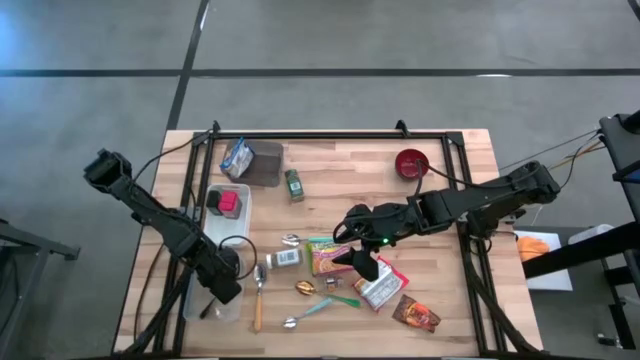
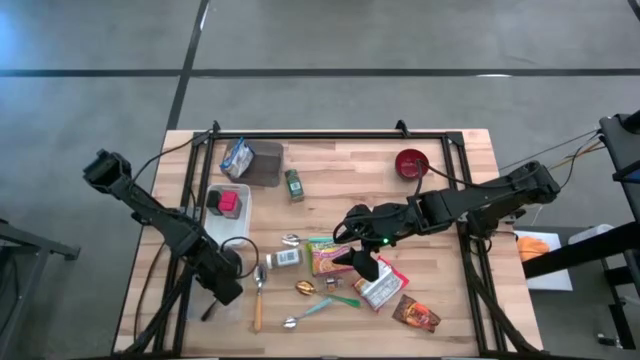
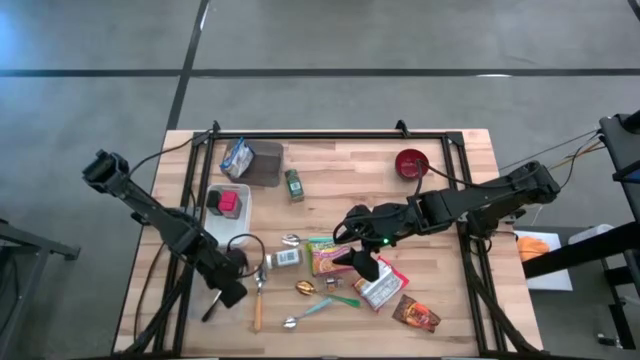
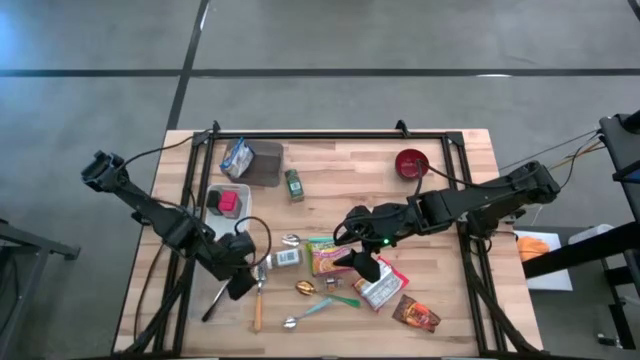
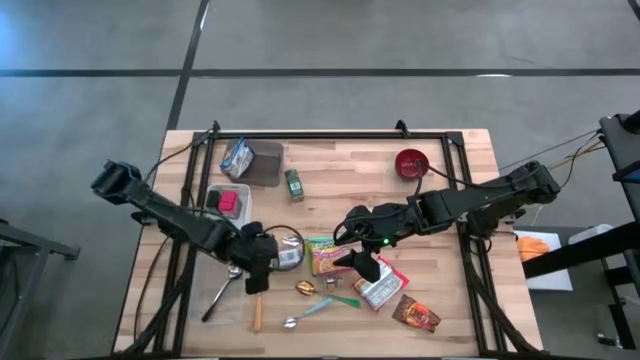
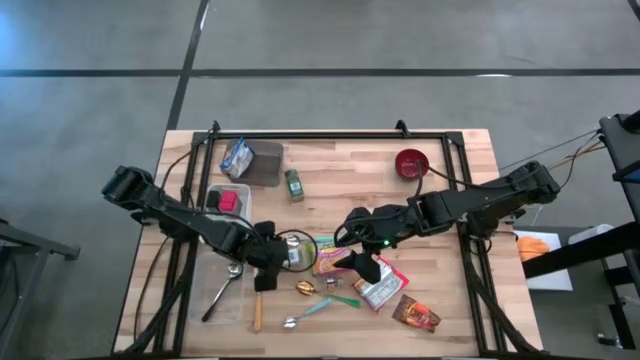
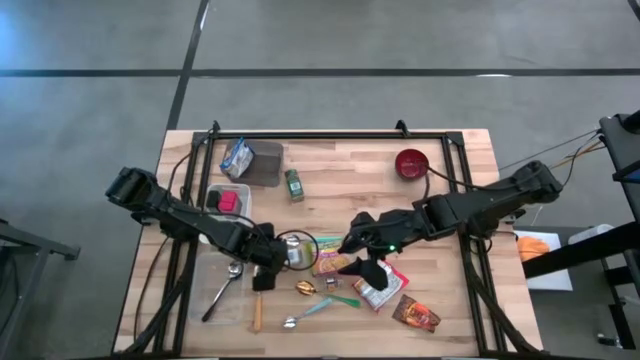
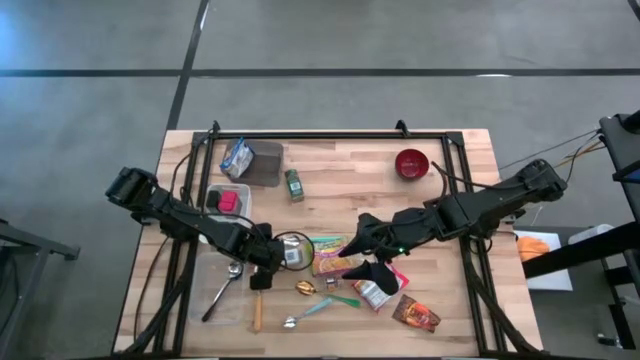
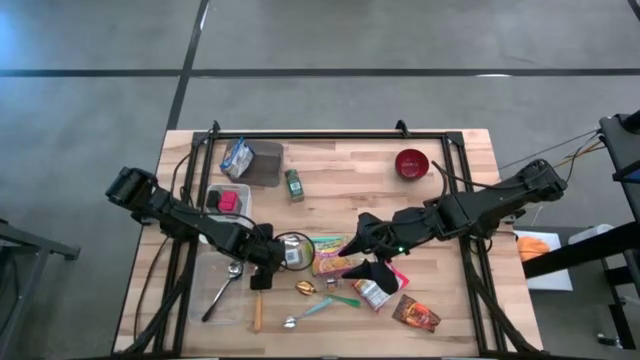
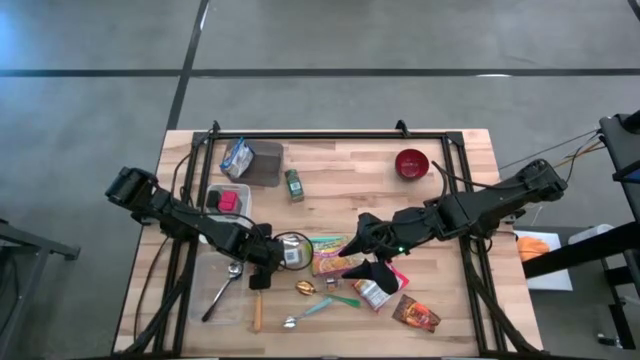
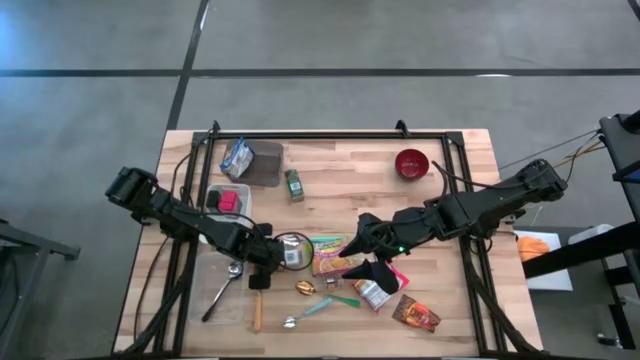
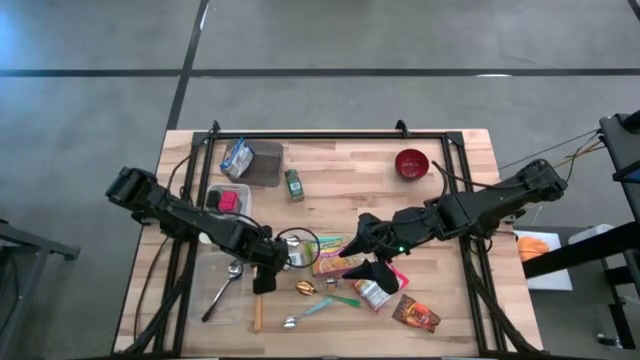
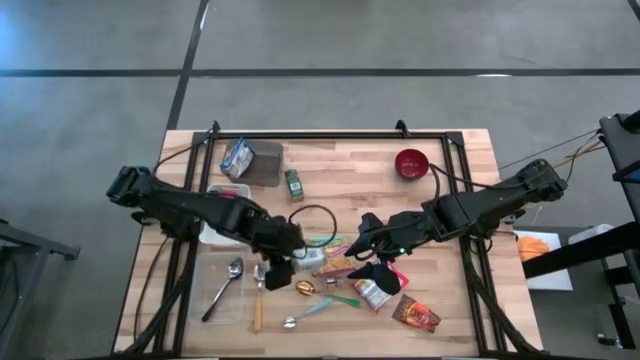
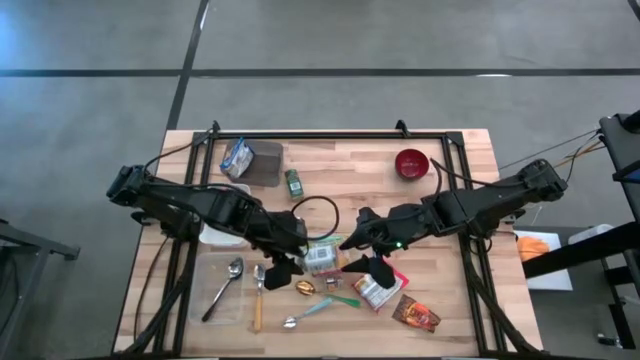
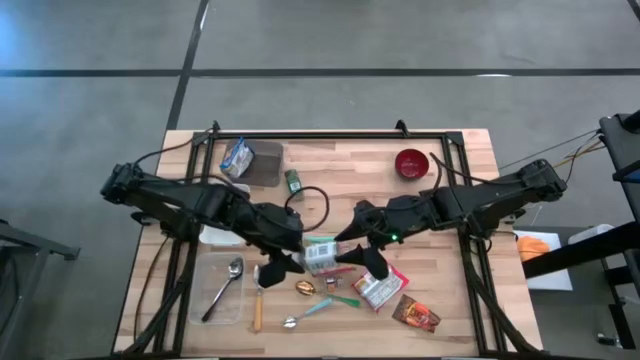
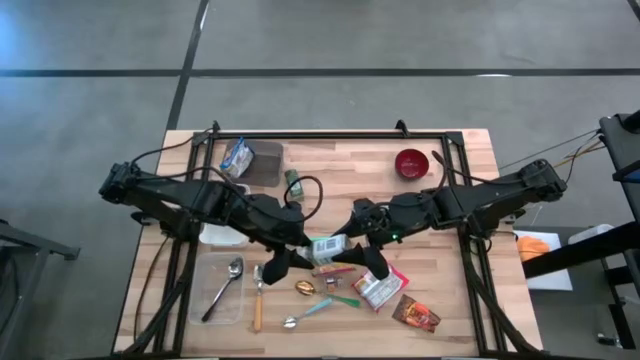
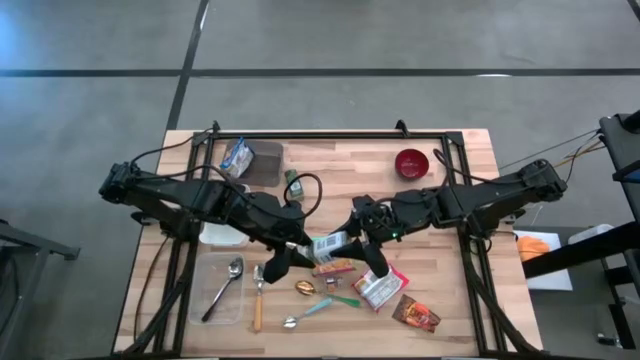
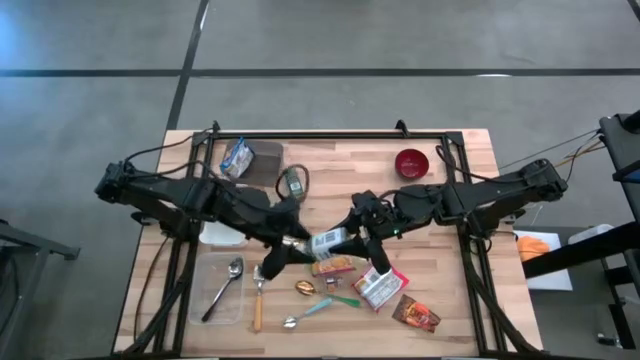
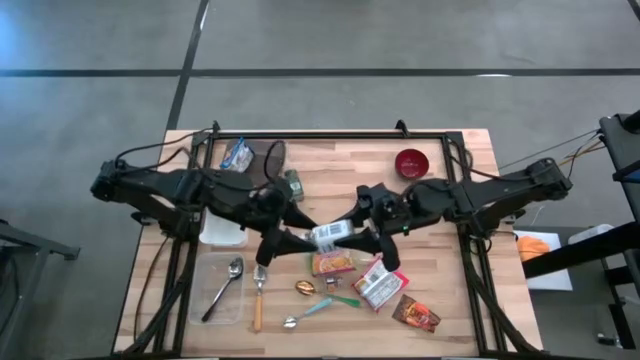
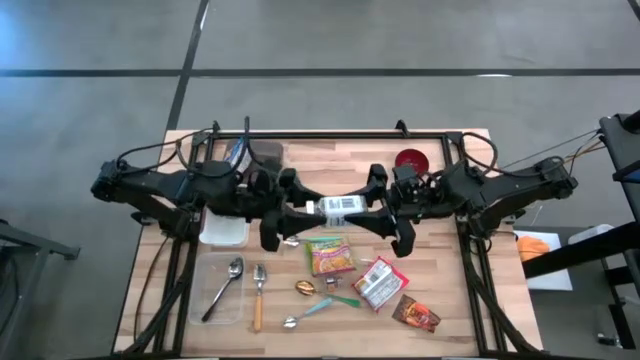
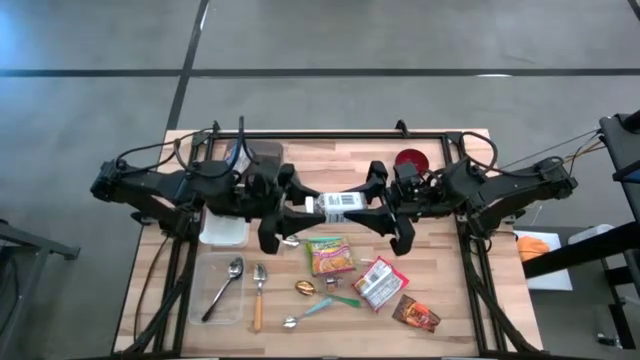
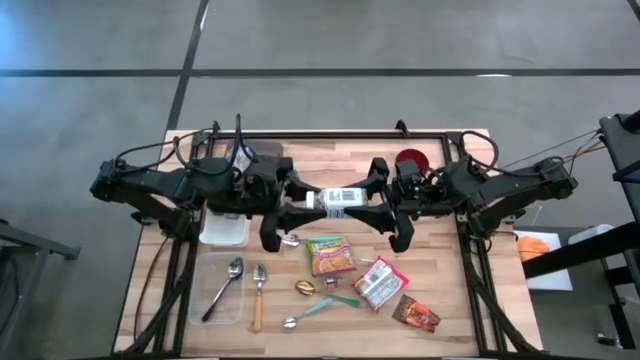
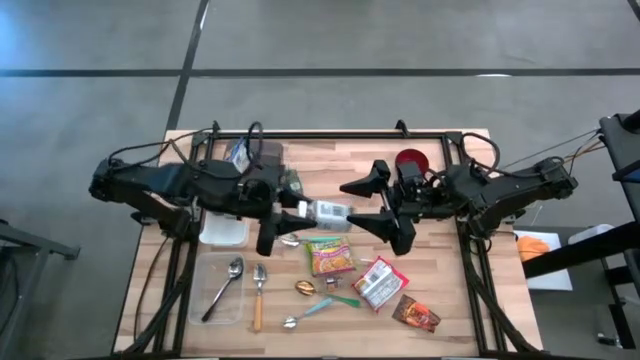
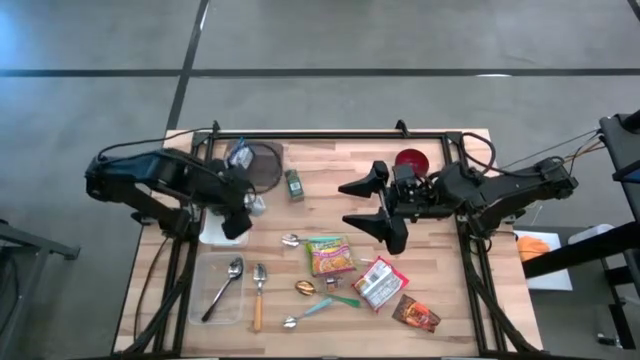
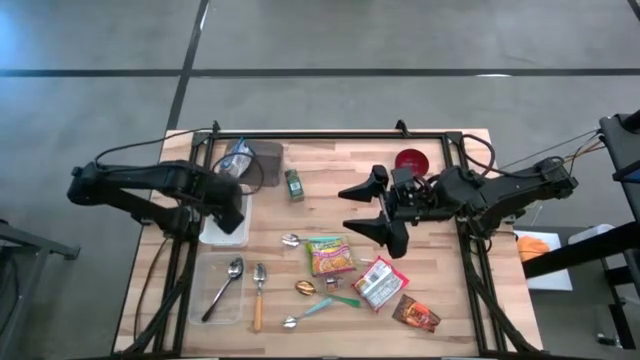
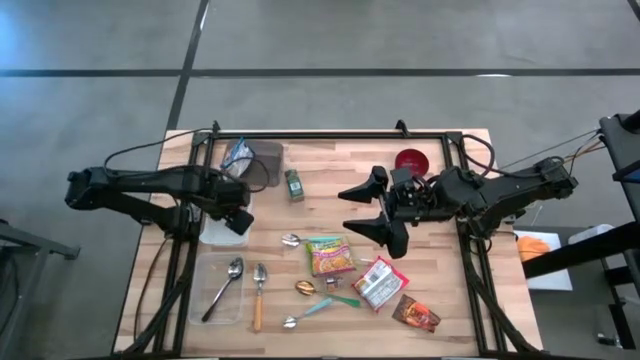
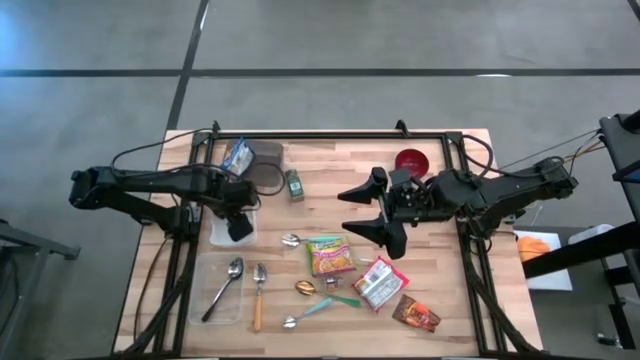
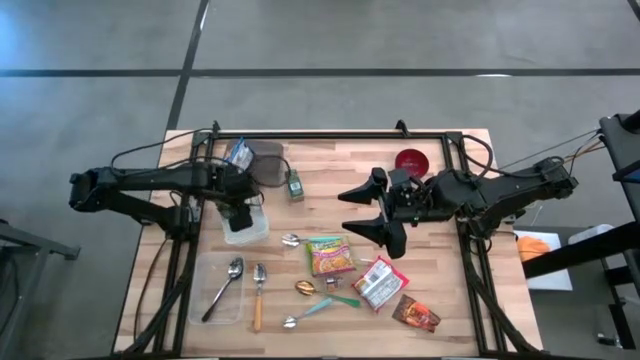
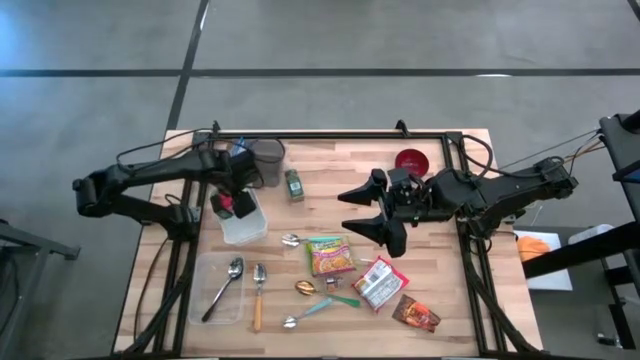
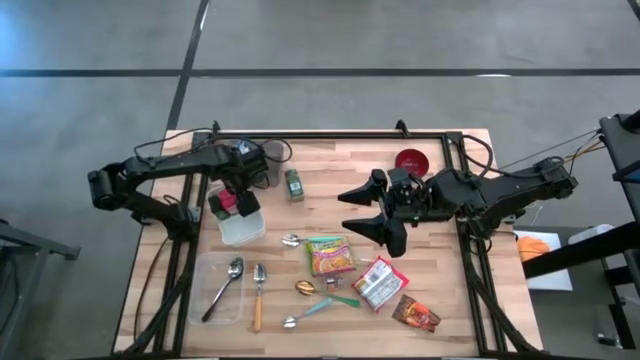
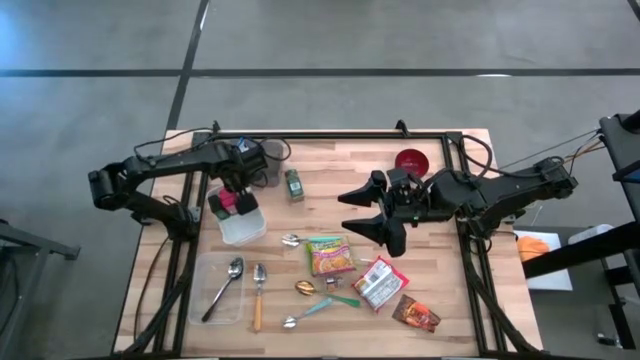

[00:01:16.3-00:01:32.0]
Put the white seasoning bottle into the white bin
